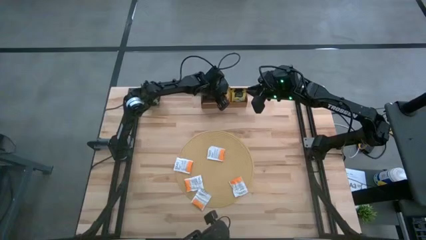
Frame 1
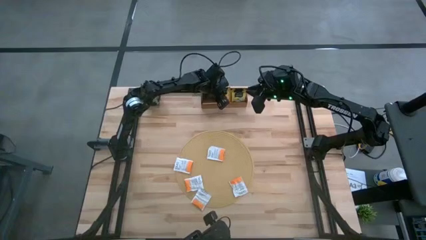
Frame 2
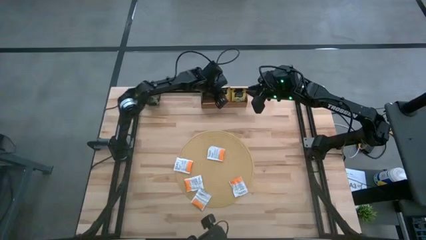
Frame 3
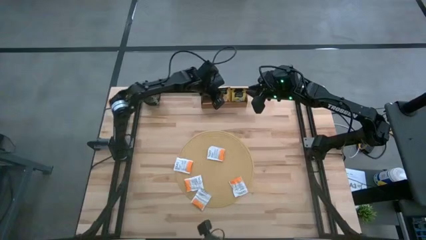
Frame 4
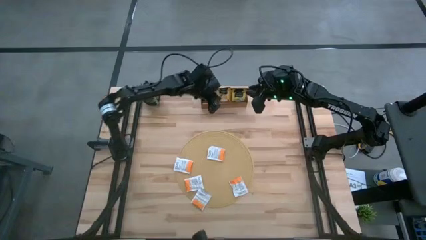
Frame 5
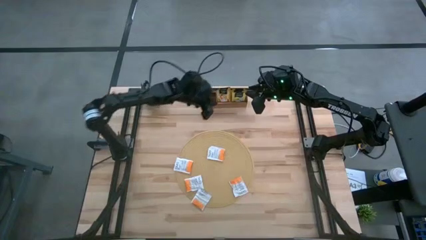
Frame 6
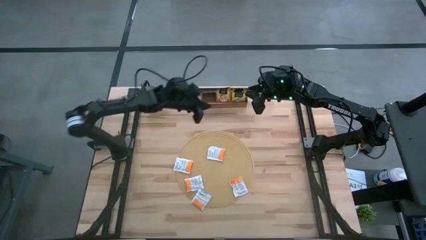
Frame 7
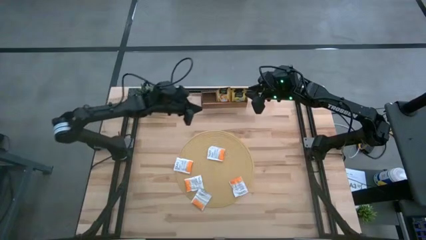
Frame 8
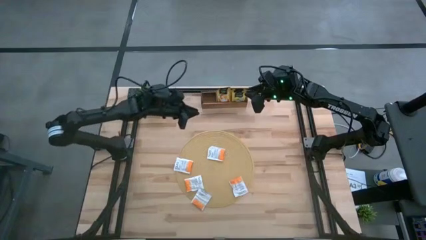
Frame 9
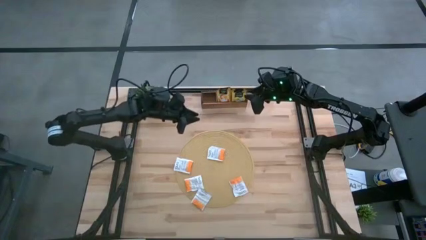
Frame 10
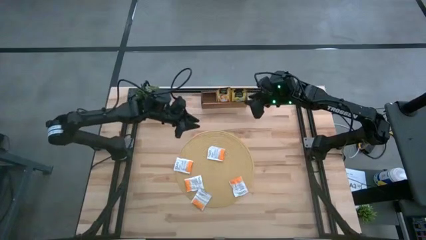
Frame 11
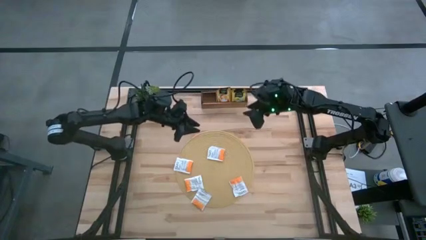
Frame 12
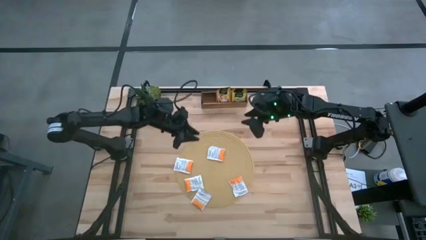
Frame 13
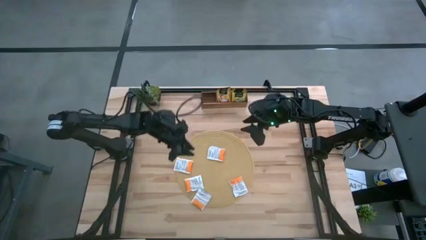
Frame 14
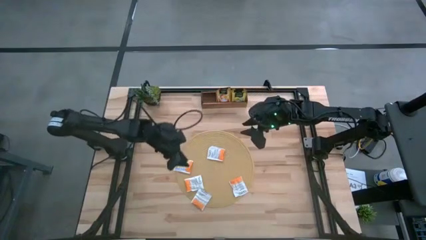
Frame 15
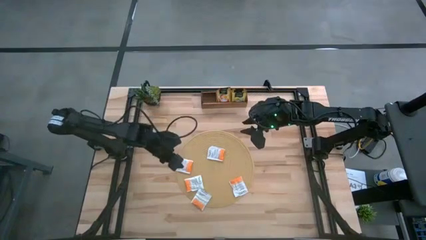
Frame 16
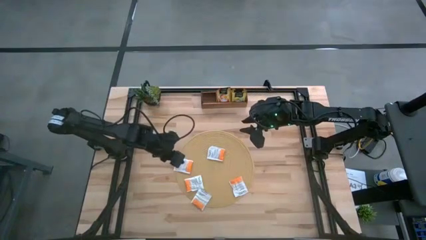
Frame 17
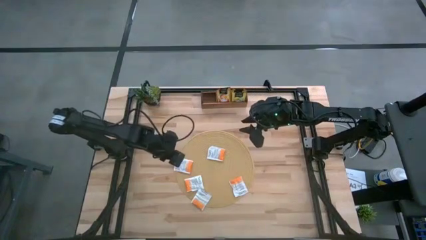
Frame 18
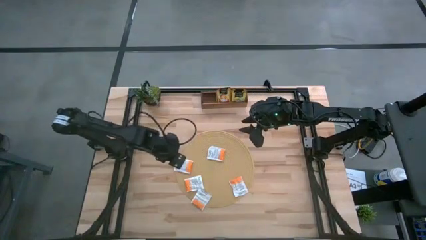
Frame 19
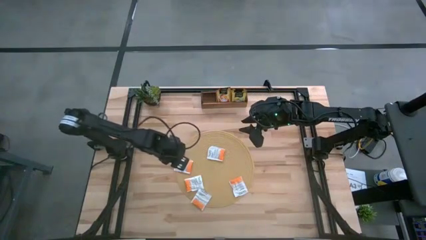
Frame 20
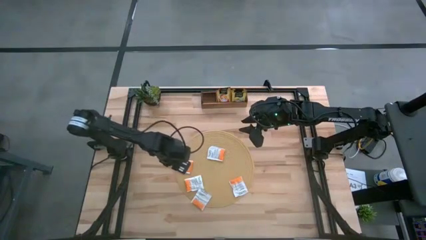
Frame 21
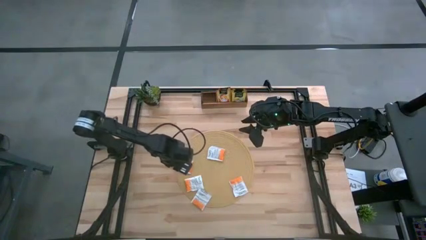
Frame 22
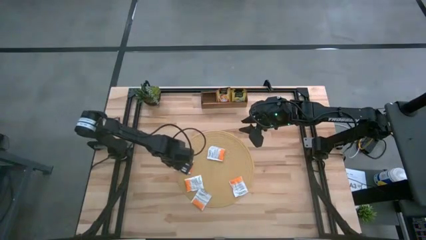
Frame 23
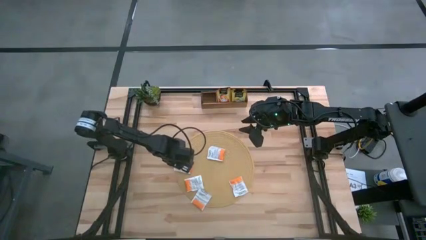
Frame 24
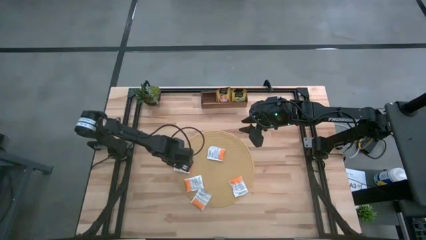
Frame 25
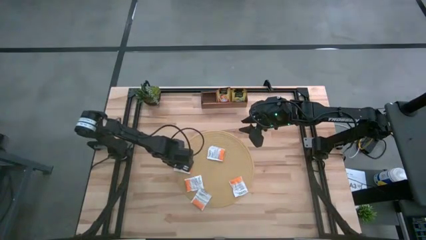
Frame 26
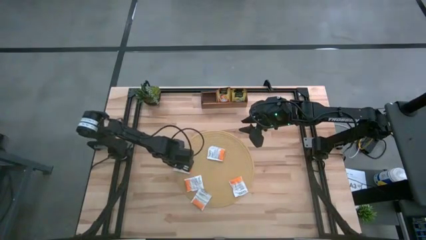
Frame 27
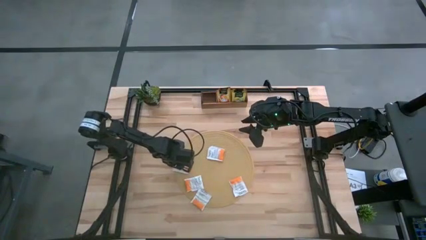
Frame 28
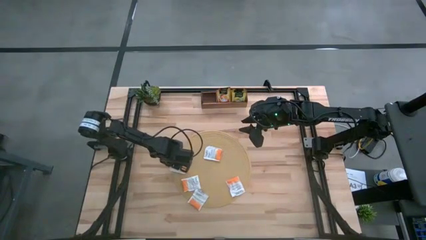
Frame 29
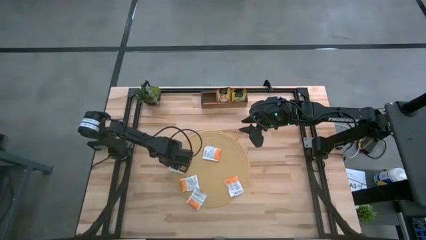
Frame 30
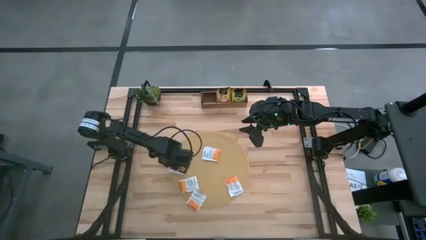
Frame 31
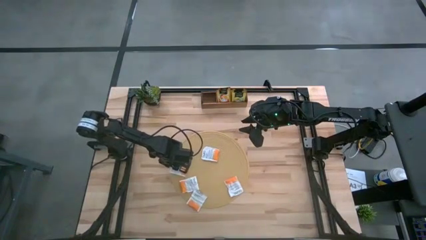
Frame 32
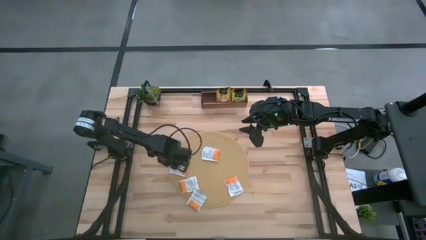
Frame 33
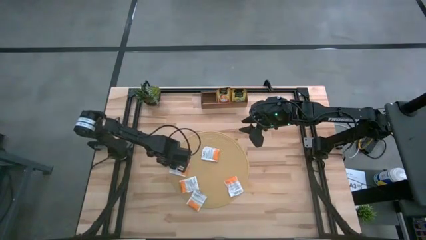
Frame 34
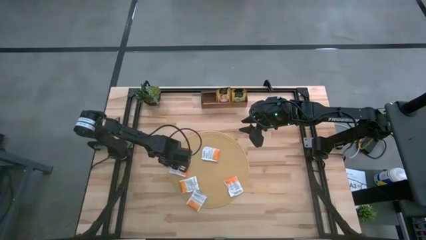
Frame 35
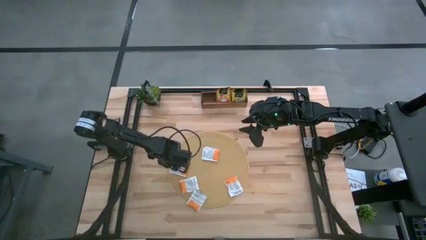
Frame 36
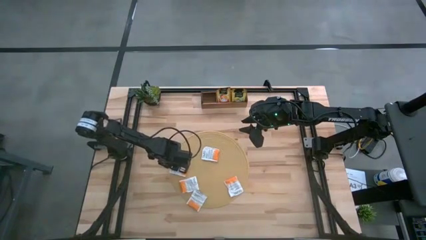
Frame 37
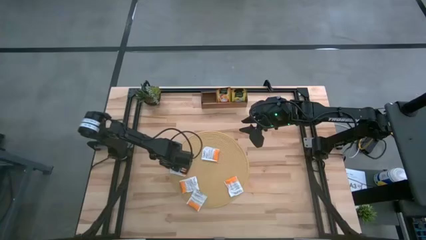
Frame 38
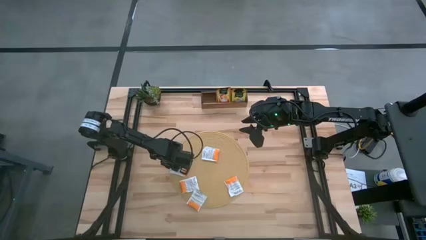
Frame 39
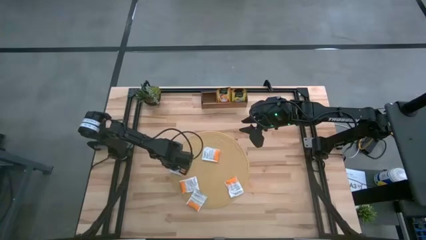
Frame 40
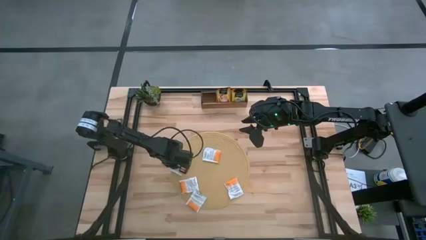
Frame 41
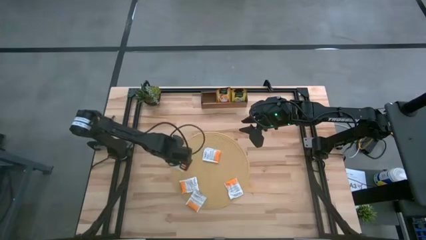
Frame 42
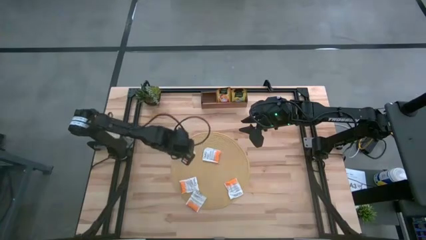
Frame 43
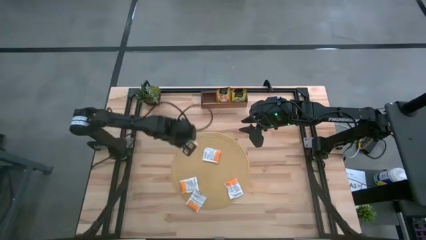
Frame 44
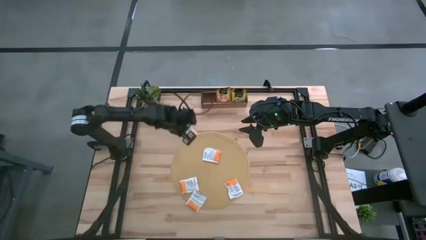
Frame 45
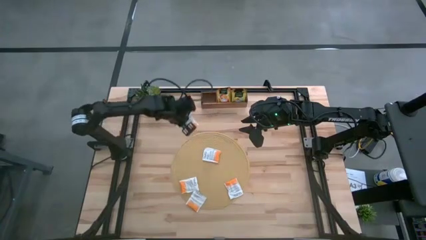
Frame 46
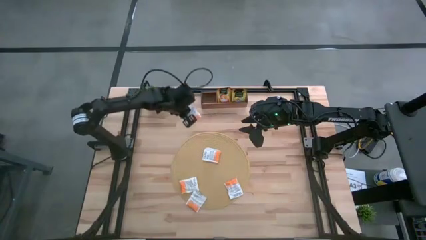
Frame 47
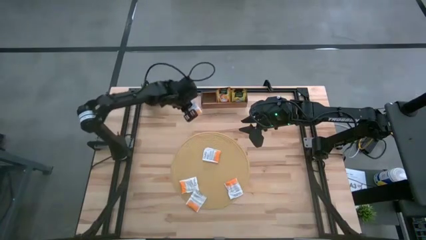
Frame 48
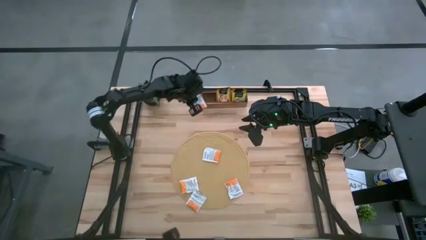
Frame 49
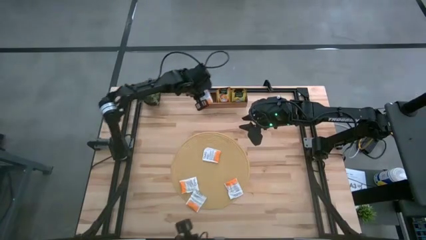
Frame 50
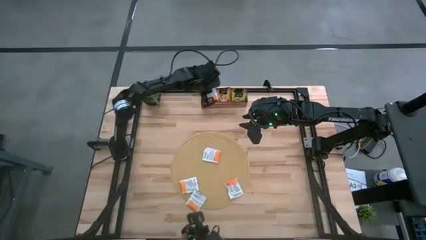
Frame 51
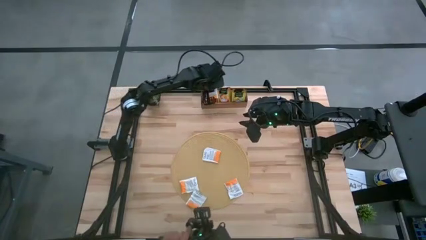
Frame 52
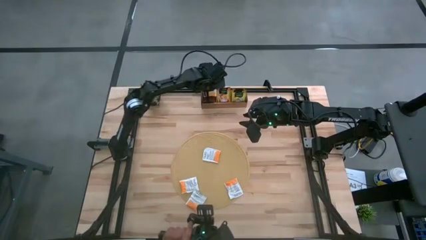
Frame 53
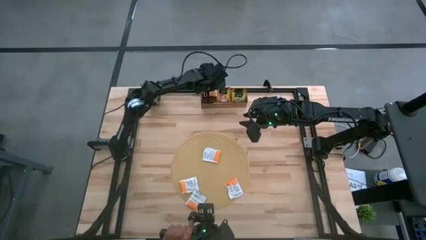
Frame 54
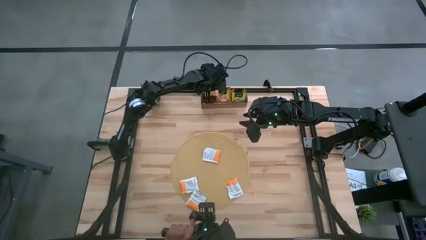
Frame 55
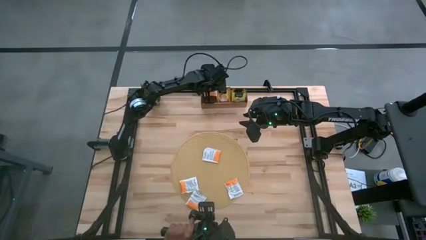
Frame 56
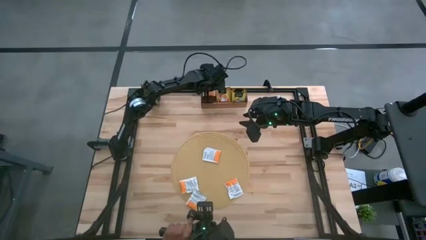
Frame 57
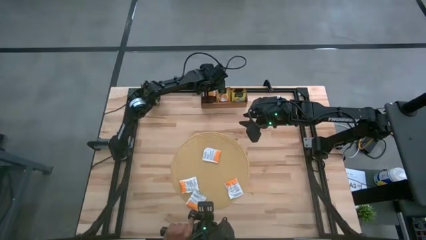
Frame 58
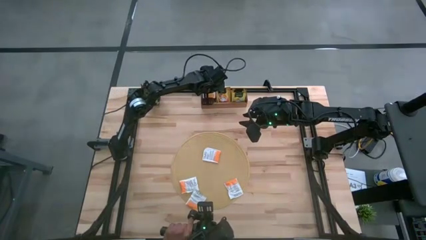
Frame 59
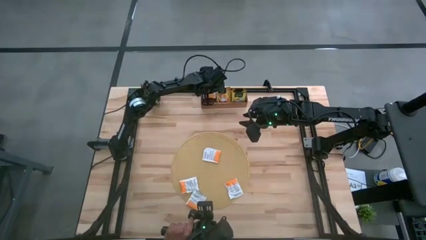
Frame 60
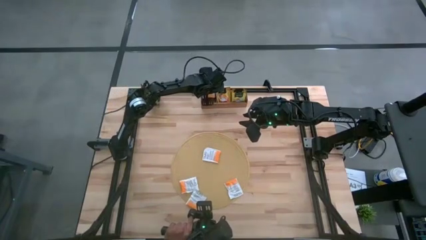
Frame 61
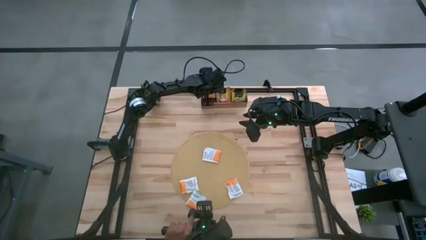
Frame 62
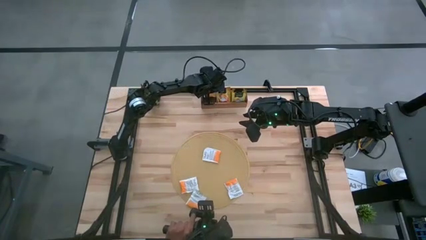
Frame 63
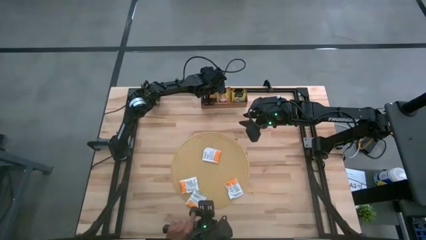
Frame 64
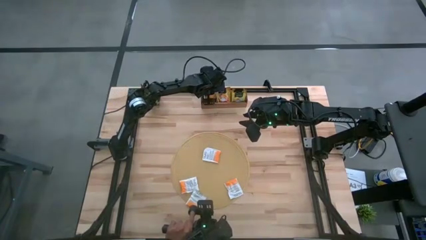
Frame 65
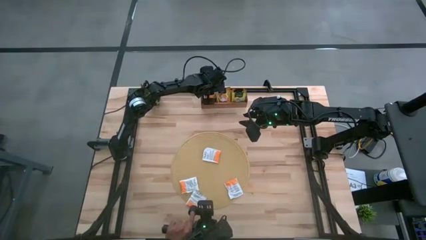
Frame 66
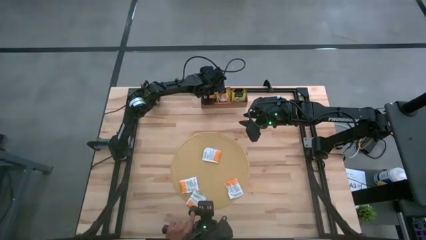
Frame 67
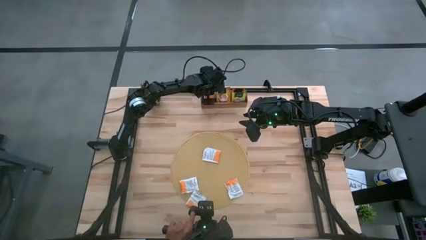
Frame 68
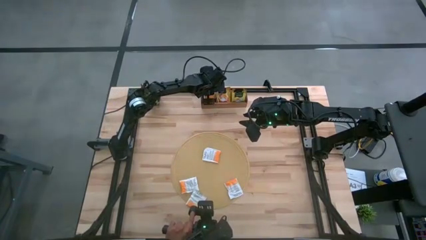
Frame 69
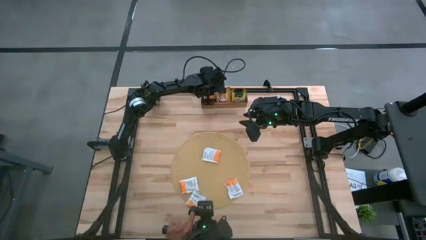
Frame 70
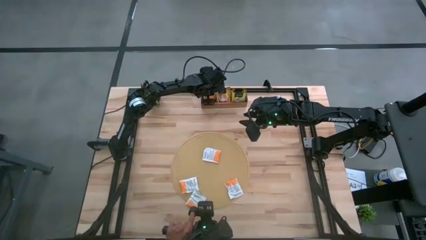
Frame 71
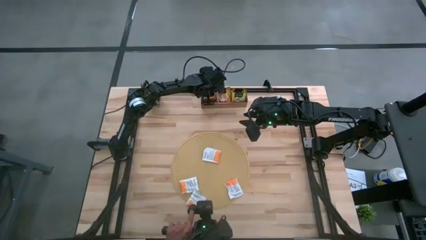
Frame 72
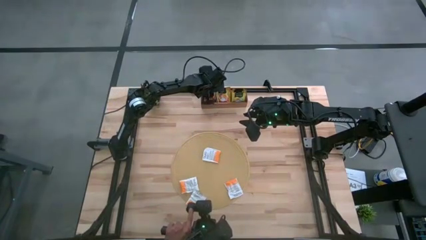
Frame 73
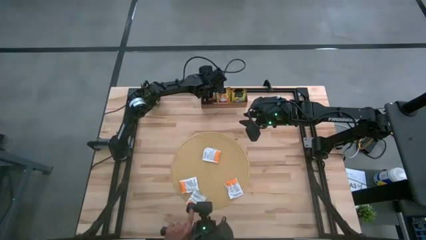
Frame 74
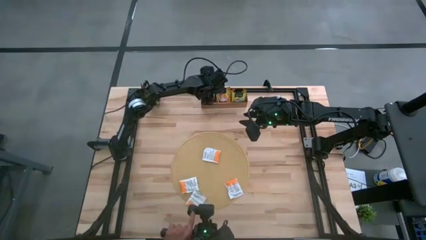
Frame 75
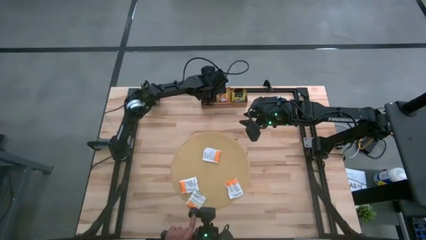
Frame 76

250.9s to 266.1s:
Task: Pick & Place Tea
Put the orange tea bag into the left section of the wooden organizer
